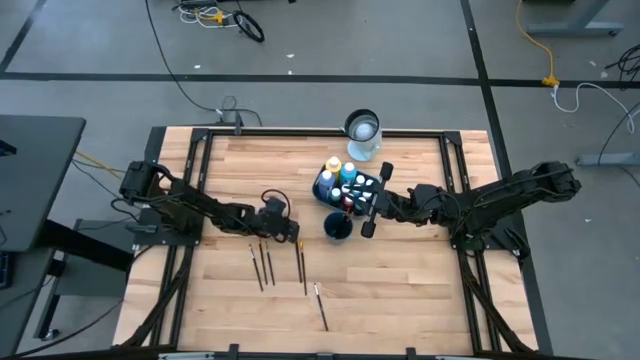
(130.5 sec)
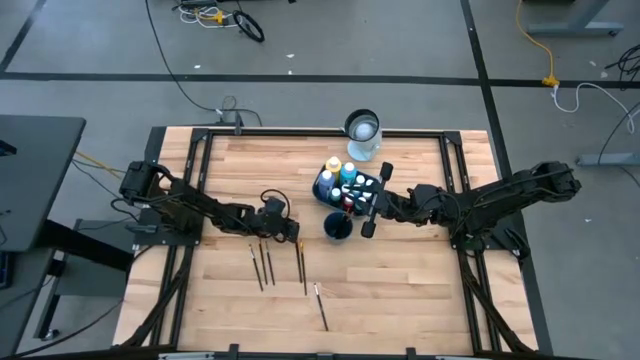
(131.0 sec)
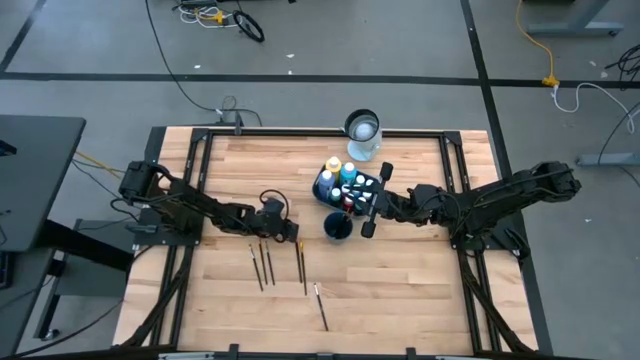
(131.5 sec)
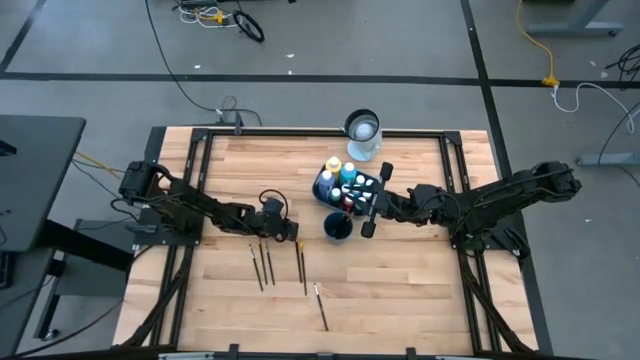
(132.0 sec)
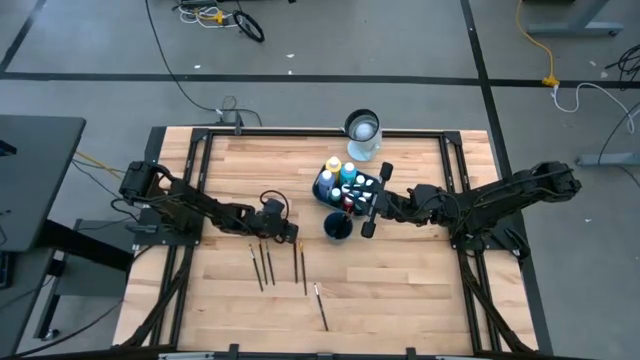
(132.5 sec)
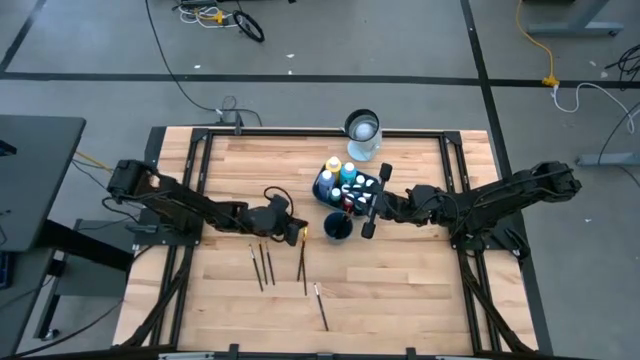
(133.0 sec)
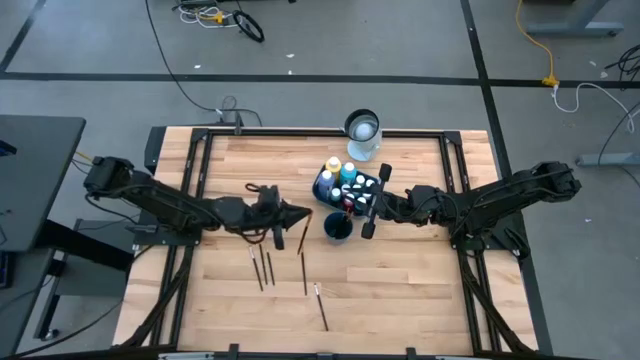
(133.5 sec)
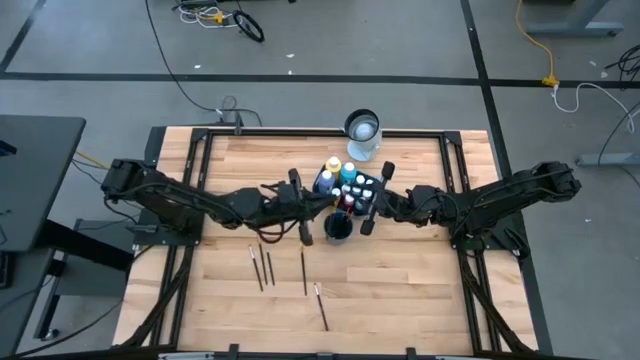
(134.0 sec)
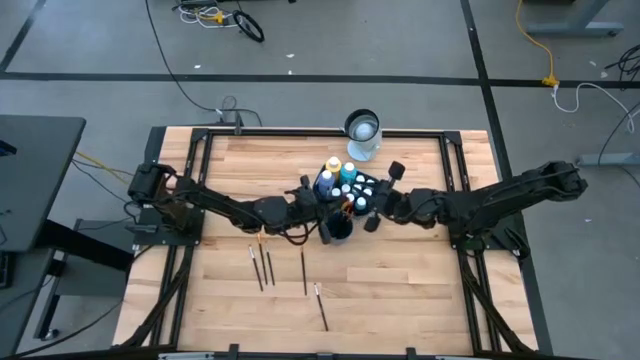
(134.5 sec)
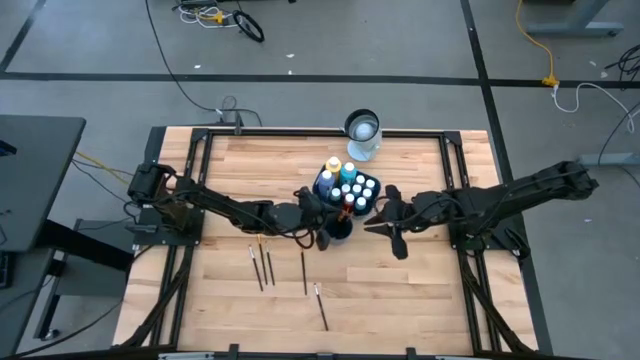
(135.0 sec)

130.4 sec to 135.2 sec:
Task: Pick & Place Paint Supplies
Put the gold paint brush into the blue cup

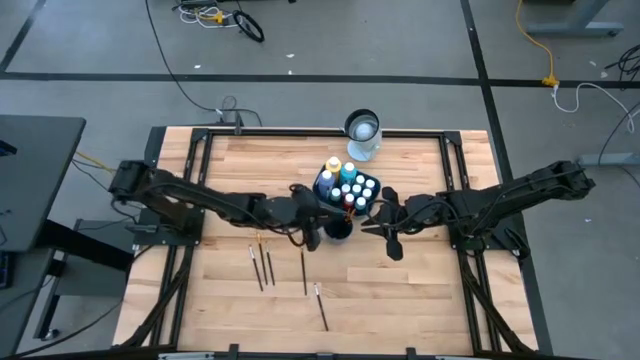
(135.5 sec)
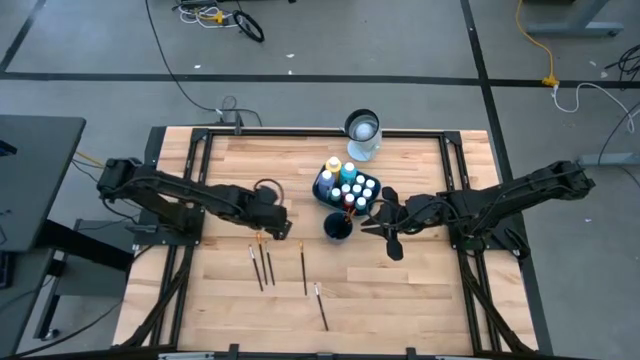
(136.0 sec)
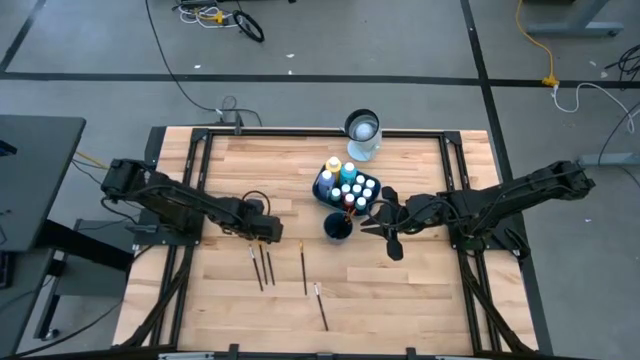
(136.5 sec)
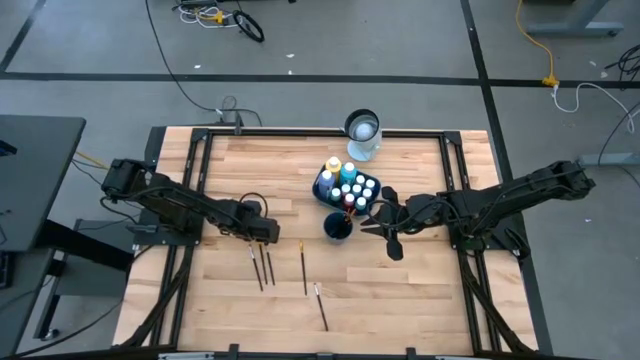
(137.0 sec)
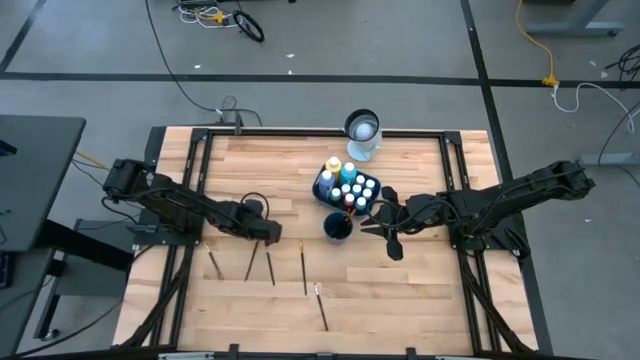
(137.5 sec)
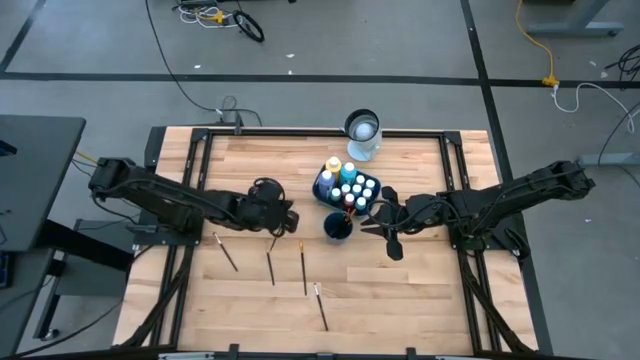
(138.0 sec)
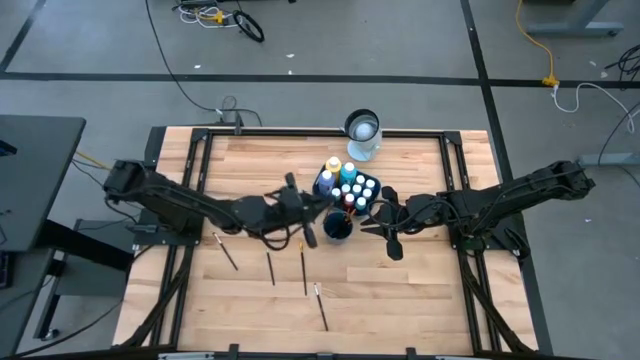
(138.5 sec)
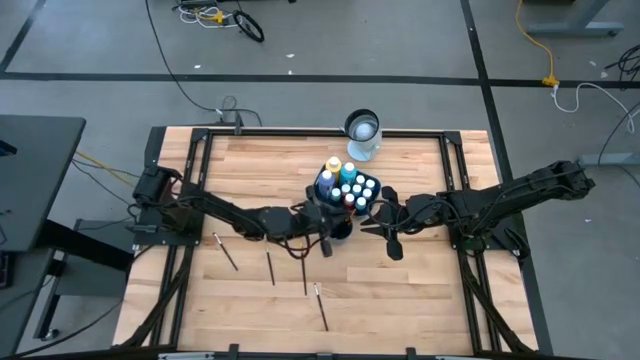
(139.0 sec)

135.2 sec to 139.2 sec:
Put the gold paint brush into the blue cup

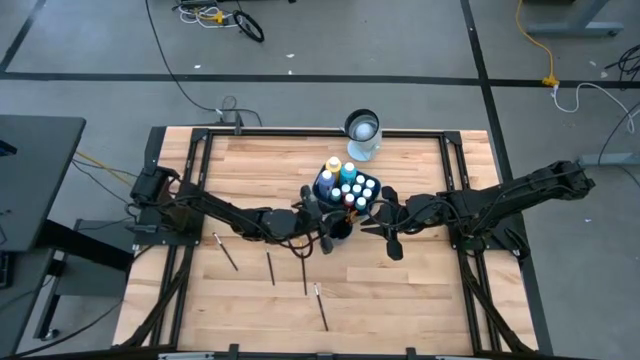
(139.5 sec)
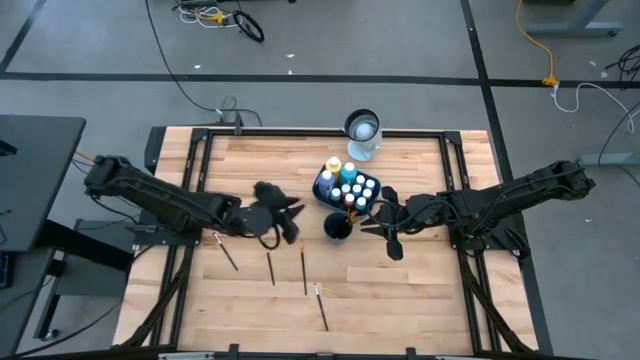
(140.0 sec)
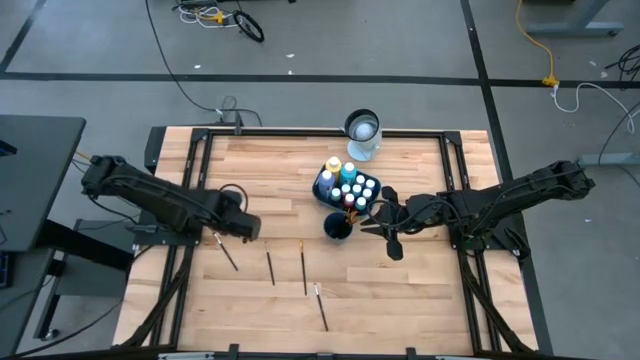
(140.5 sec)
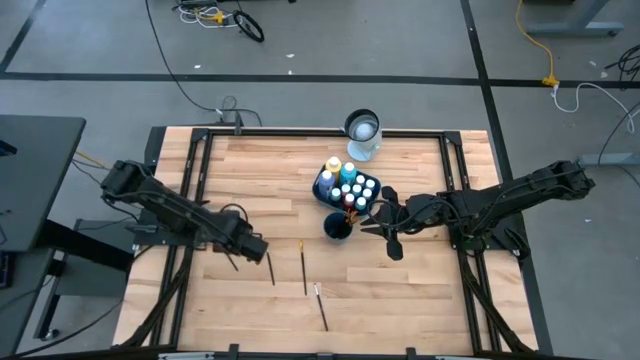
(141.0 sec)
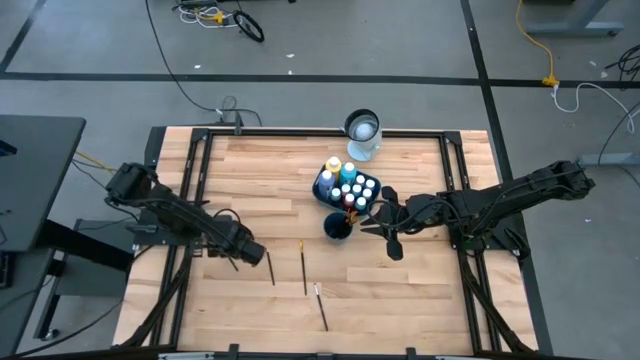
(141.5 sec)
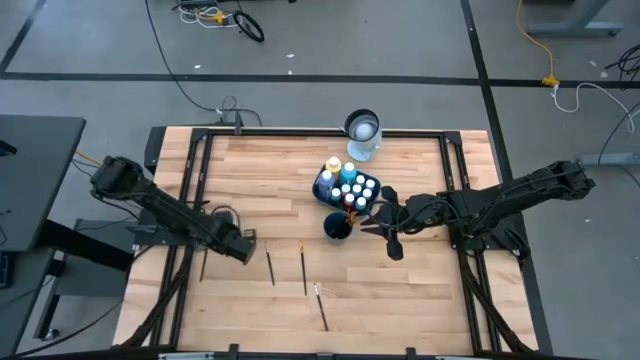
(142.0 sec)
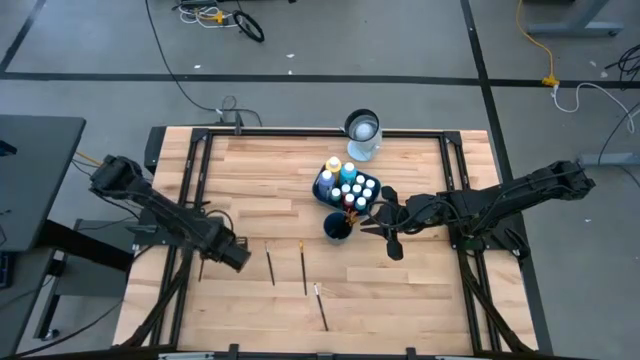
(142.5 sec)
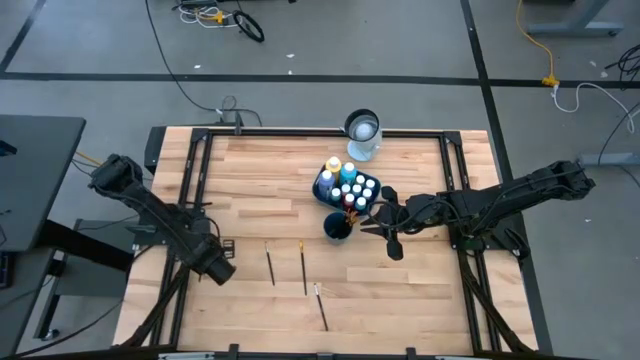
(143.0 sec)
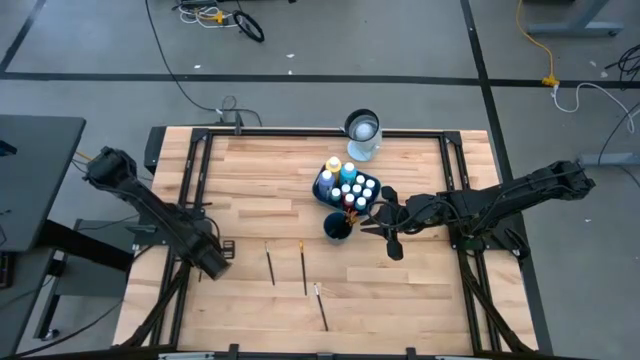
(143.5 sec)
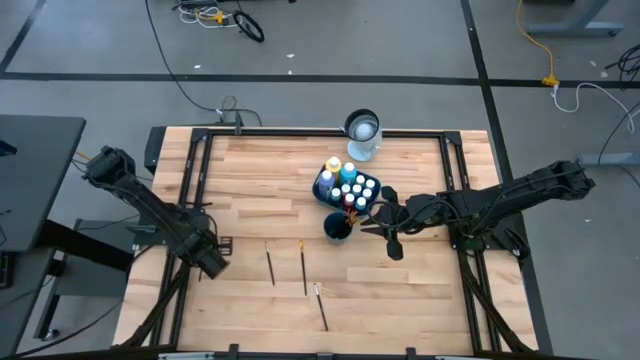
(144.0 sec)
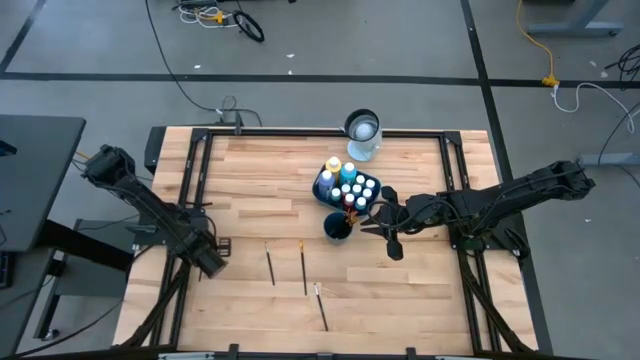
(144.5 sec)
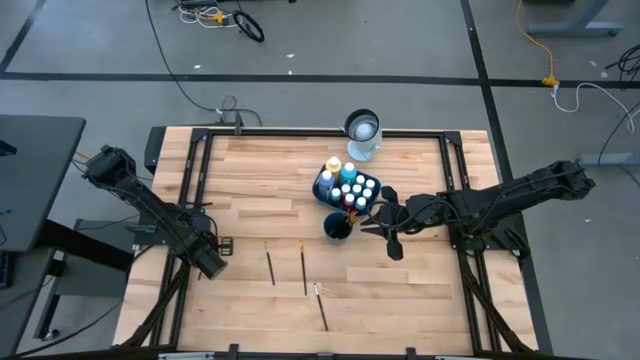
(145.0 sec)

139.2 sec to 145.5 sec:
Put the silver paint brush into the blue cup

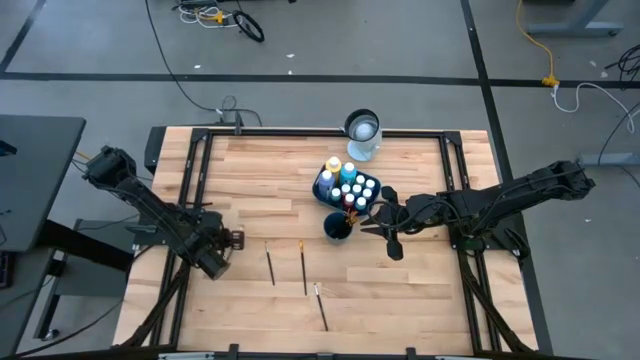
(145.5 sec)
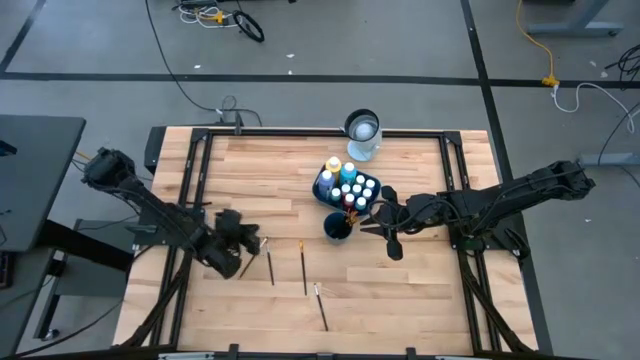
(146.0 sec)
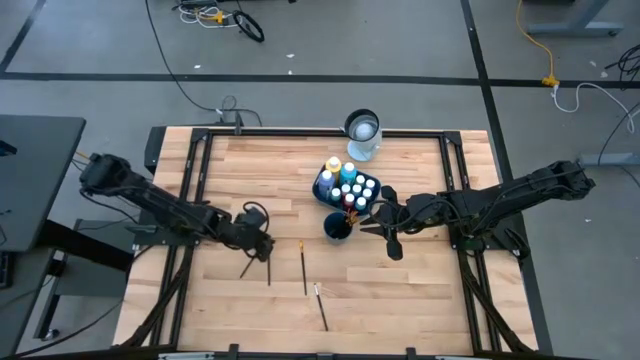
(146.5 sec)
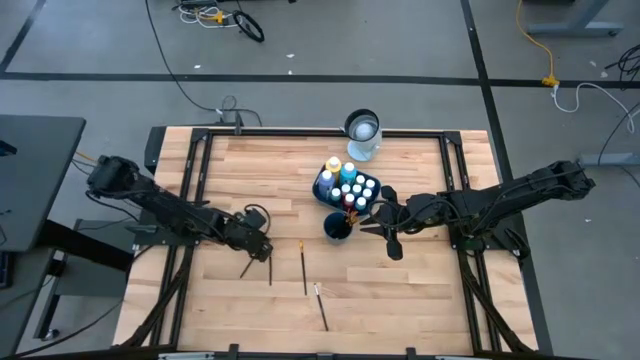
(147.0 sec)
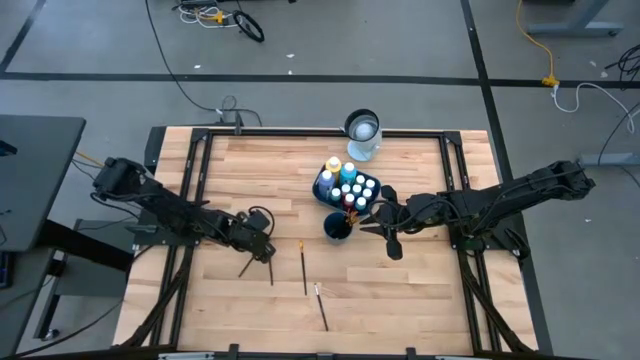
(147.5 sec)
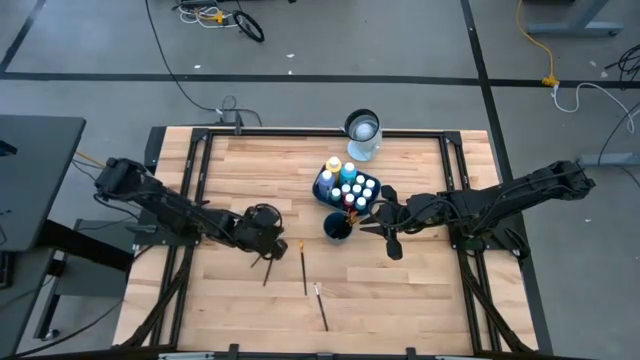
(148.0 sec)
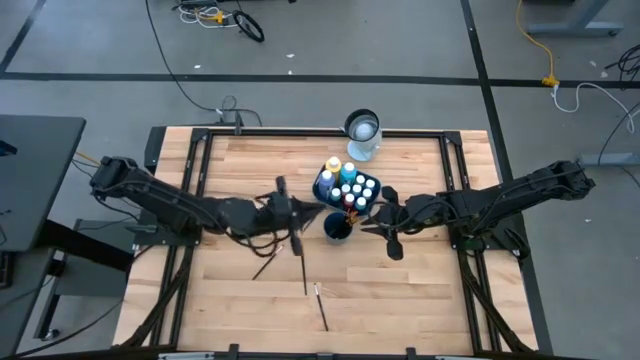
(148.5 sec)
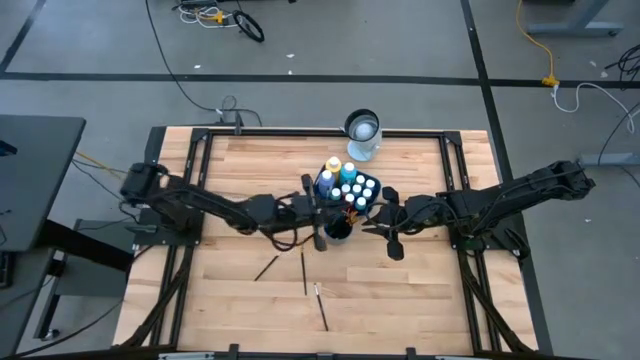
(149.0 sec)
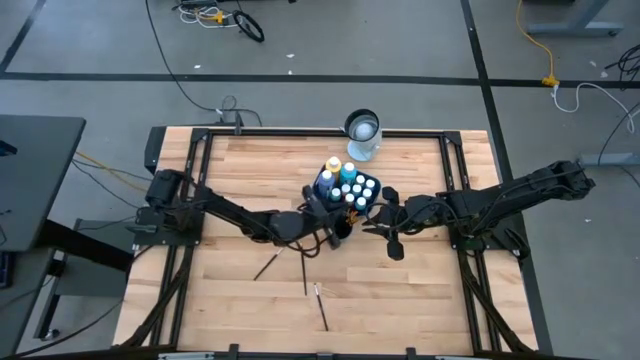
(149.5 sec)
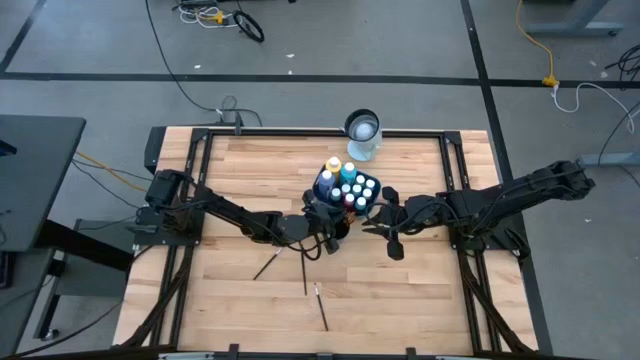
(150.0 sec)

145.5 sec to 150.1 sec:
Put the silver paint brush into the blue cup
